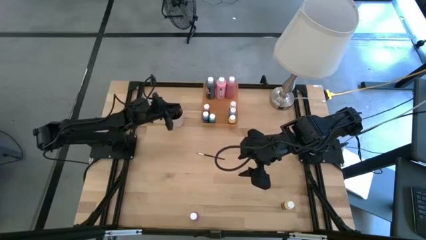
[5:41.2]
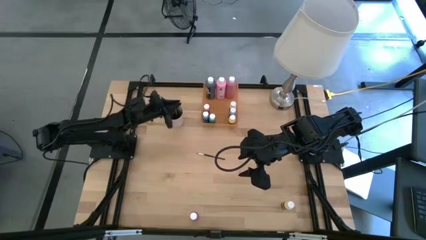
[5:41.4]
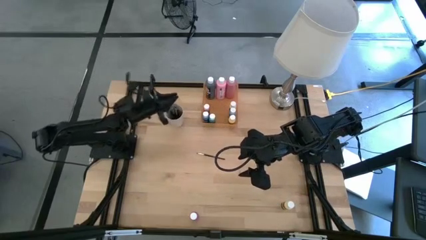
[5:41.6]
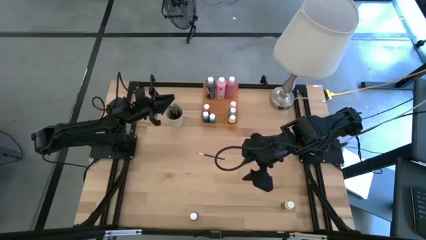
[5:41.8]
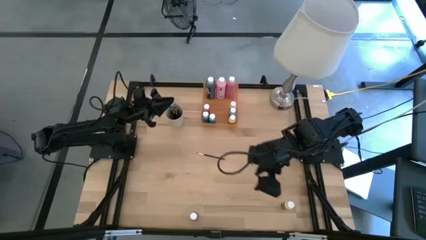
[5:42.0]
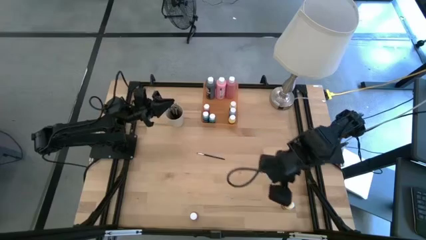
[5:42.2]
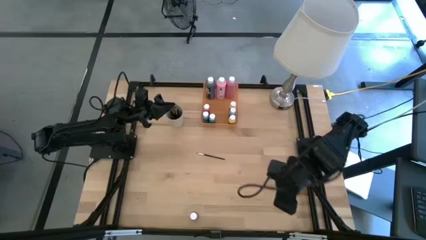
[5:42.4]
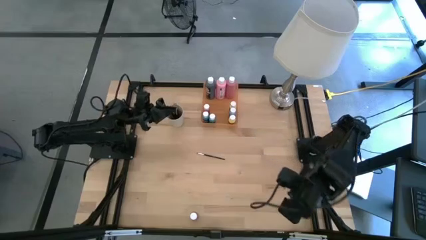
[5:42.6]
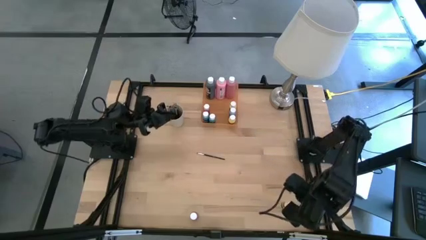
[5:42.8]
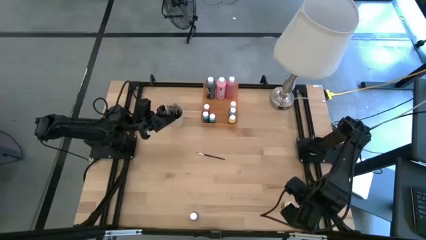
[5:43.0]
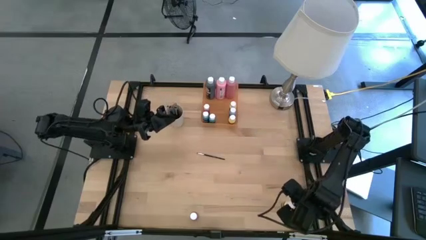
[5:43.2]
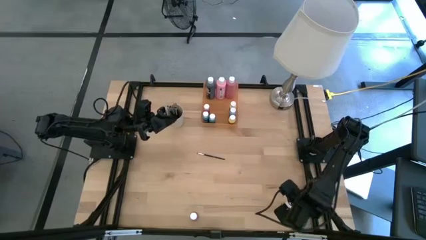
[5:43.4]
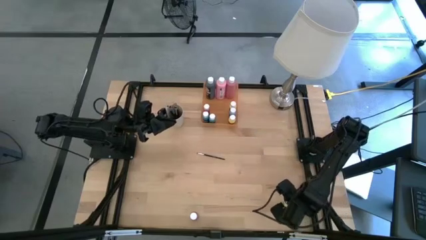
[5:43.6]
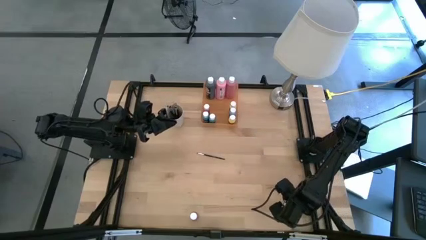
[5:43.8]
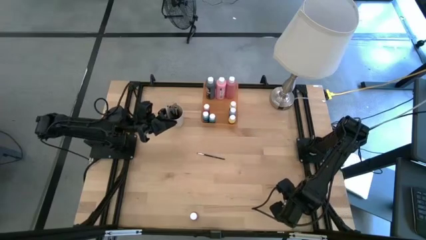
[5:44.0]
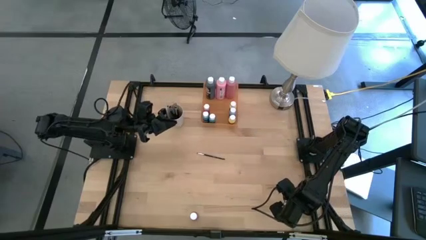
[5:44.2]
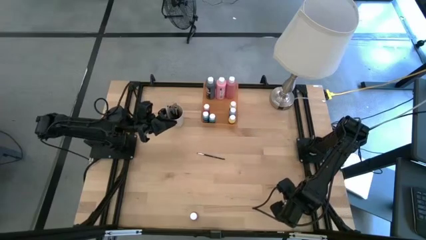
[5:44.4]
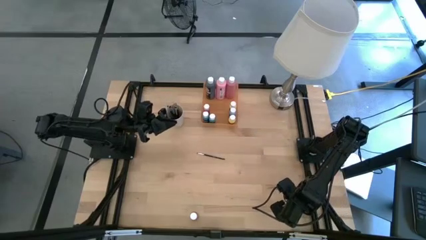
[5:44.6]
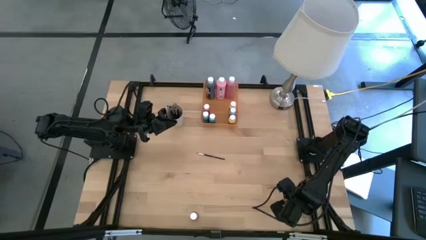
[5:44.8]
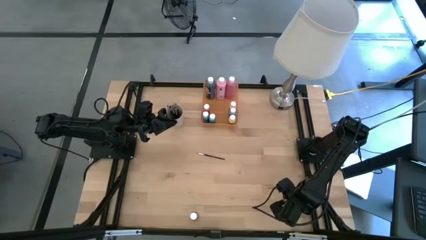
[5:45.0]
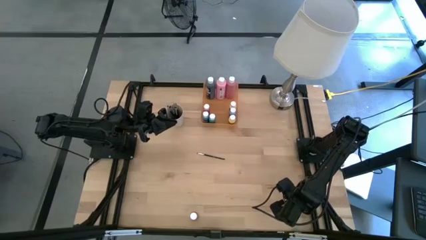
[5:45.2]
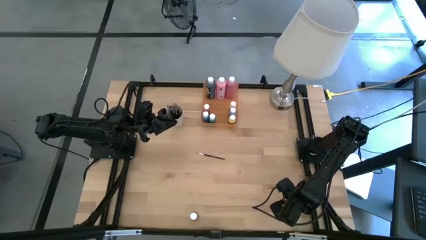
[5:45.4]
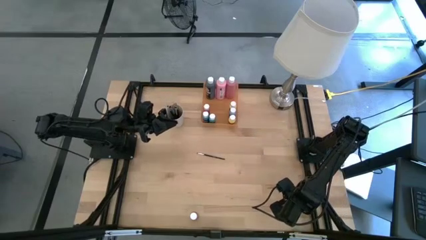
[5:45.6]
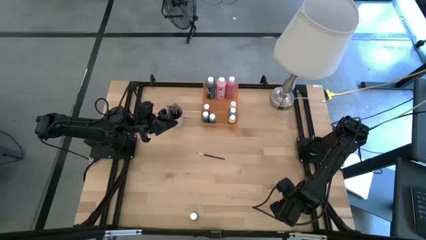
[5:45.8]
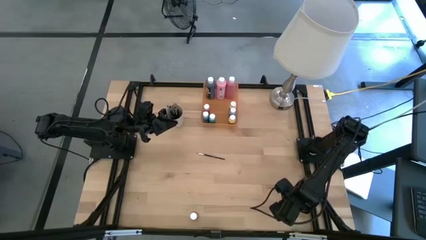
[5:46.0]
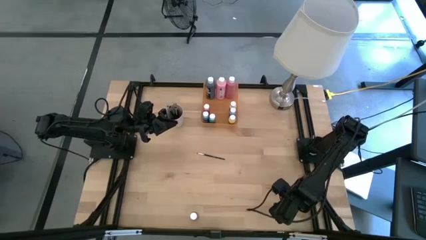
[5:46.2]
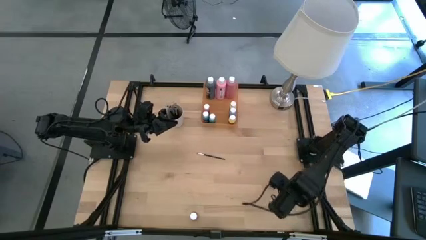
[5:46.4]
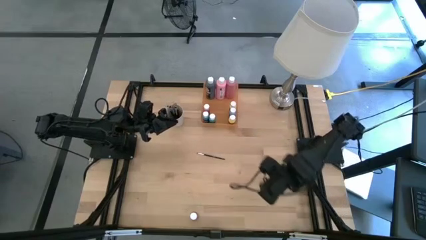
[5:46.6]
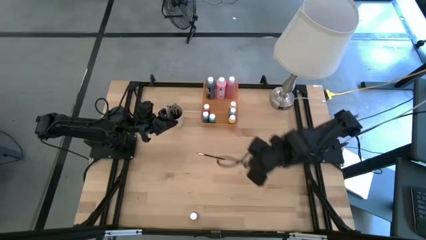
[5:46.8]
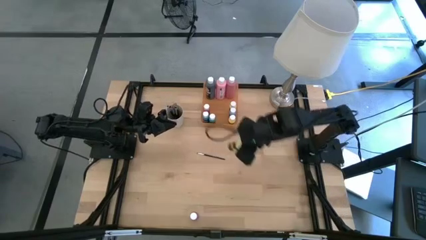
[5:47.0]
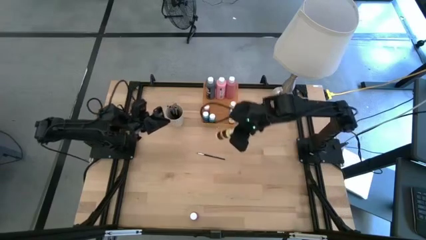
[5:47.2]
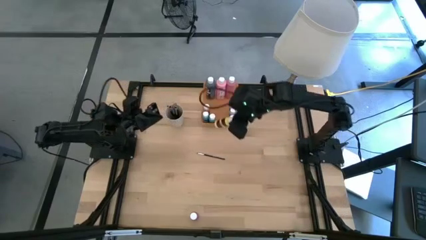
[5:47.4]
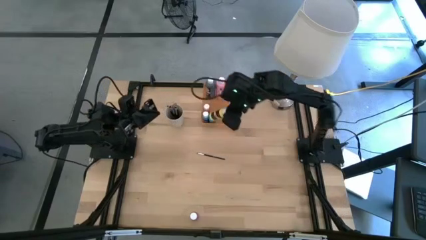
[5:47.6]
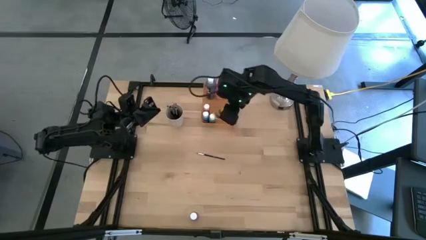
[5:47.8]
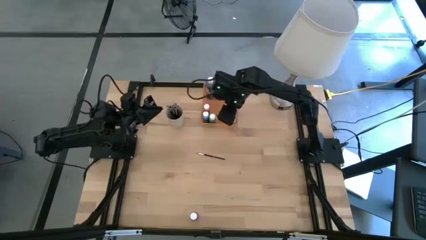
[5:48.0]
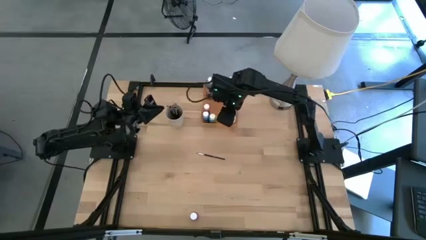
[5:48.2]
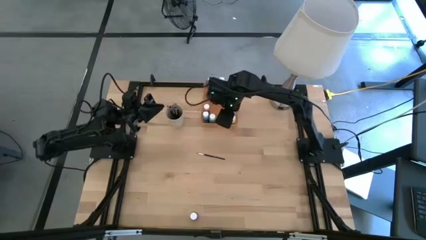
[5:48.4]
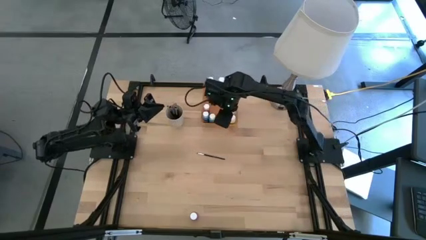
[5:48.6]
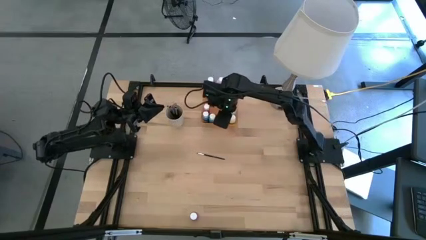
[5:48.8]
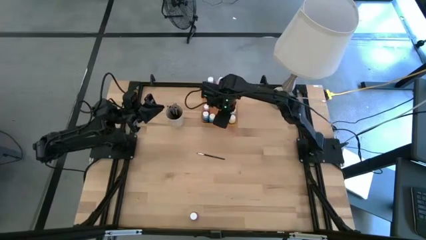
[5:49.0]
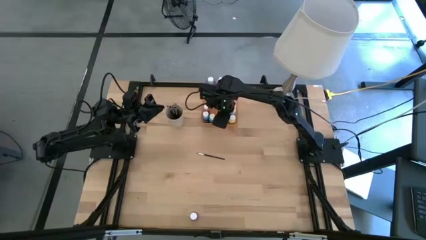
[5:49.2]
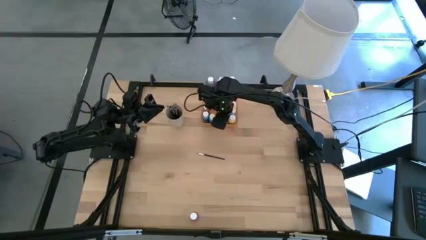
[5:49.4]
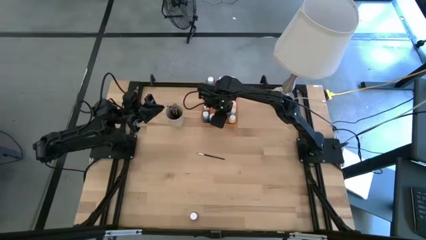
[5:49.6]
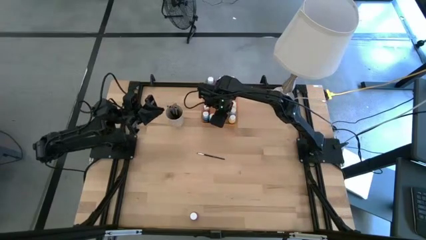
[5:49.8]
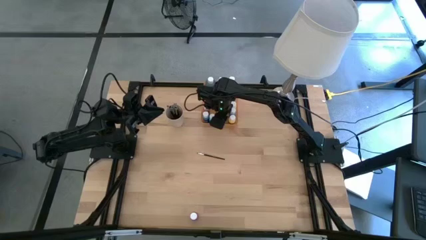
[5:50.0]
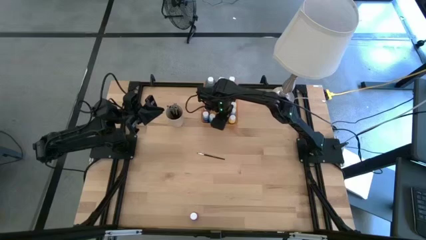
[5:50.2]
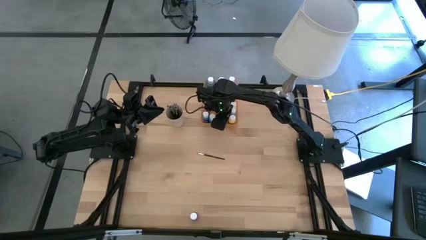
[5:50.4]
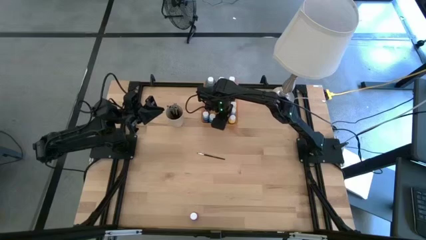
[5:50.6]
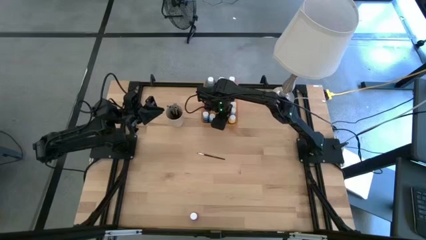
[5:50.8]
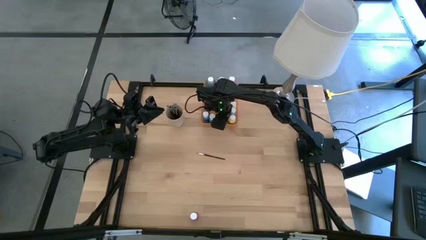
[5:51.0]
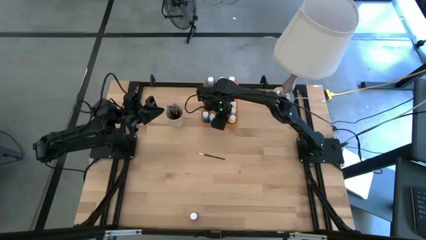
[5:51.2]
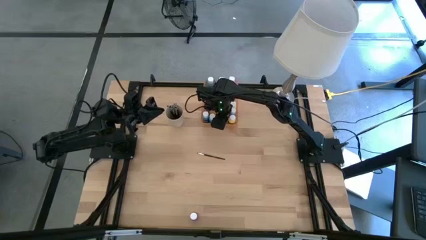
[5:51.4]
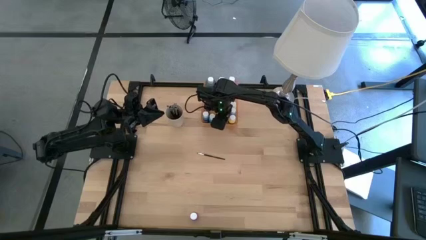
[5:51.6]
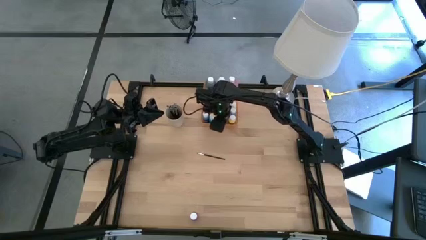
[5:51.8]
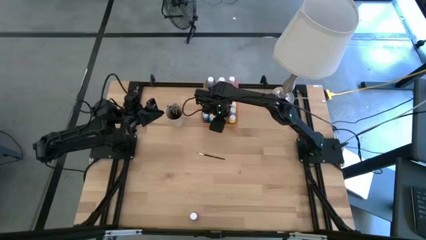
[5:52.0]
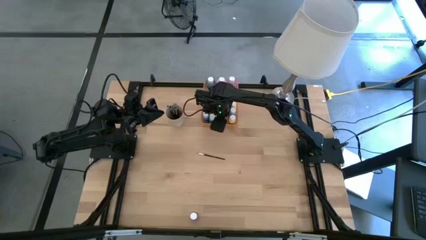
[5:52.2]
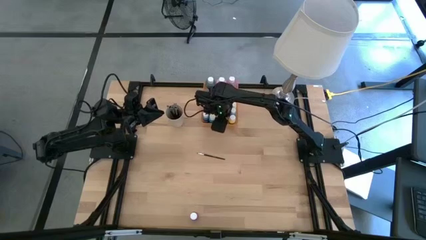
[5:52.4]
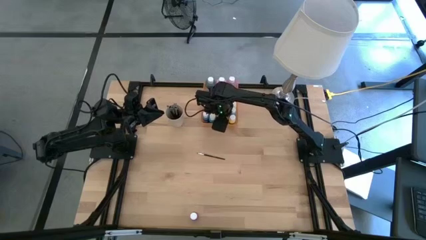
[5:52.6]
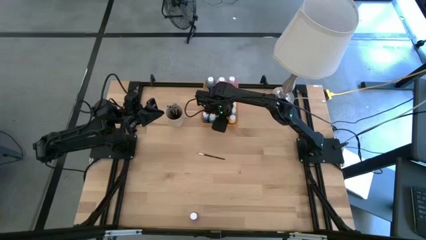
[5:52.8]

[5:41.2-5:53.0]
Task: Pick & Place Paint Supplies
Put the yellow paint bottle into the orange bin

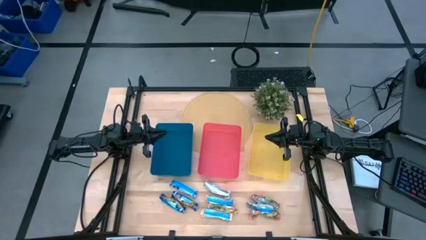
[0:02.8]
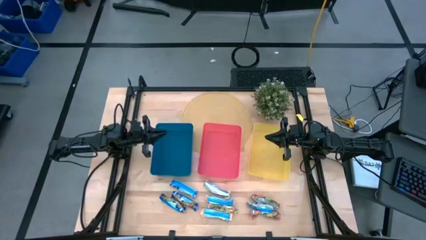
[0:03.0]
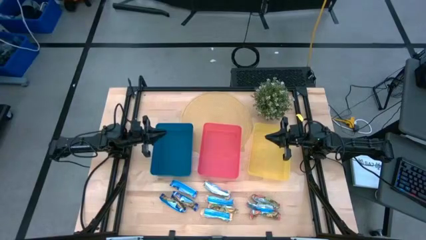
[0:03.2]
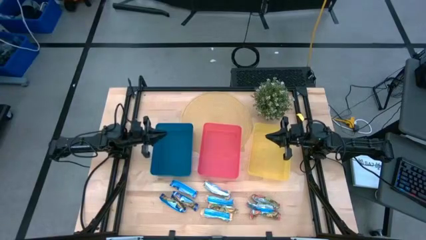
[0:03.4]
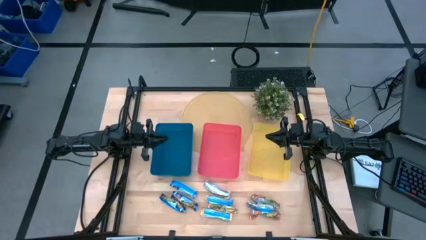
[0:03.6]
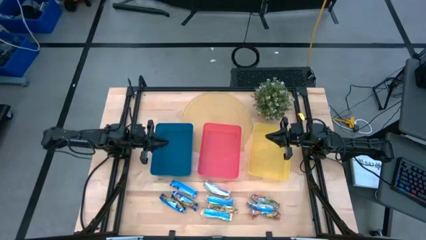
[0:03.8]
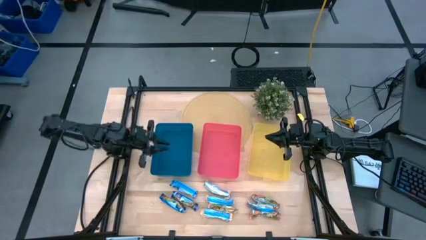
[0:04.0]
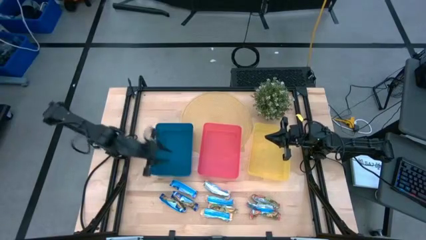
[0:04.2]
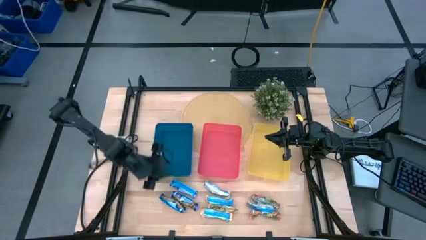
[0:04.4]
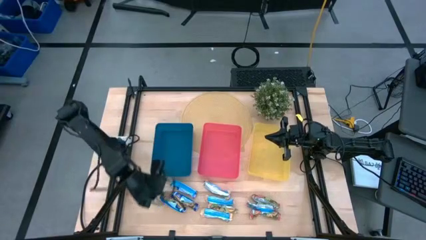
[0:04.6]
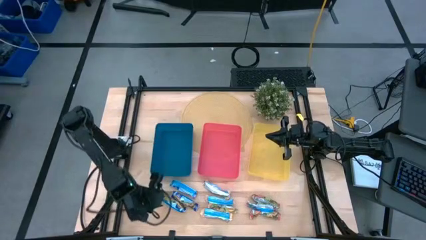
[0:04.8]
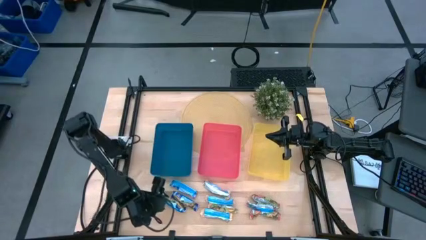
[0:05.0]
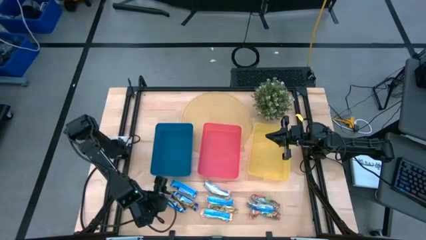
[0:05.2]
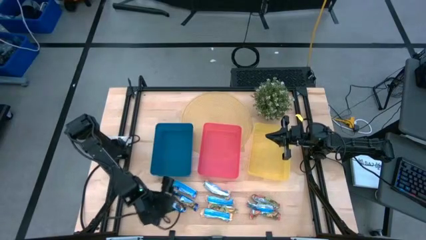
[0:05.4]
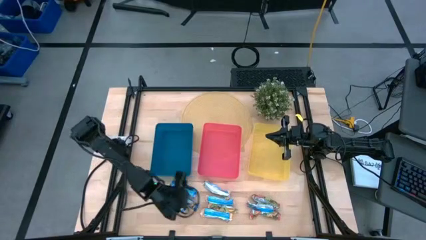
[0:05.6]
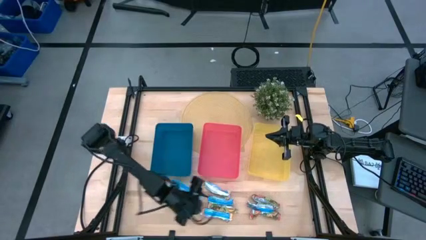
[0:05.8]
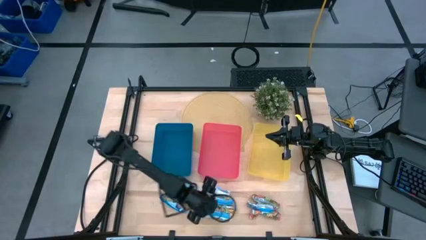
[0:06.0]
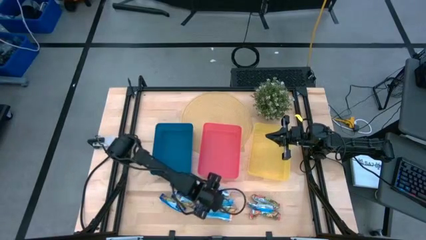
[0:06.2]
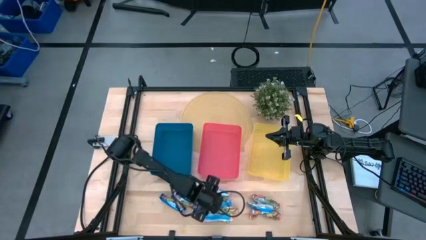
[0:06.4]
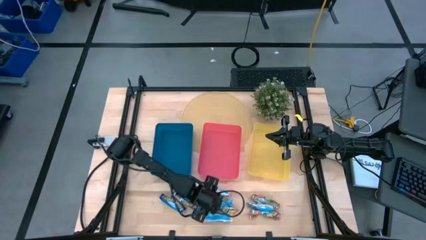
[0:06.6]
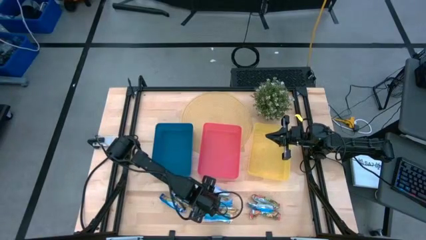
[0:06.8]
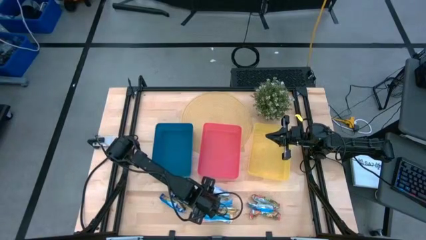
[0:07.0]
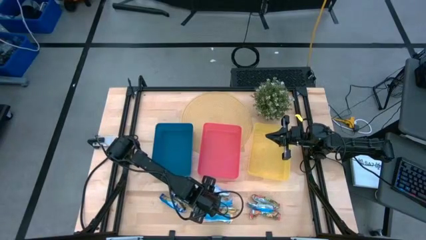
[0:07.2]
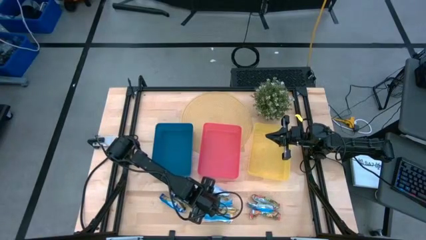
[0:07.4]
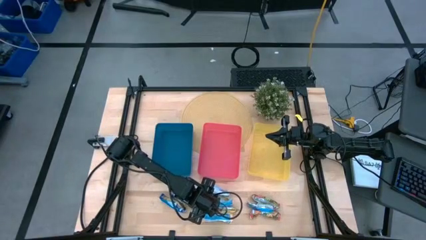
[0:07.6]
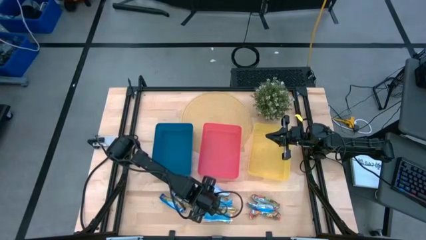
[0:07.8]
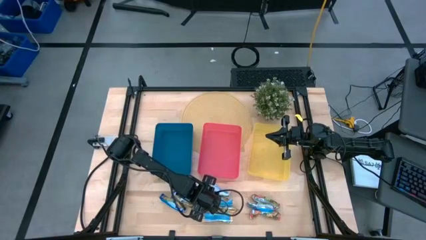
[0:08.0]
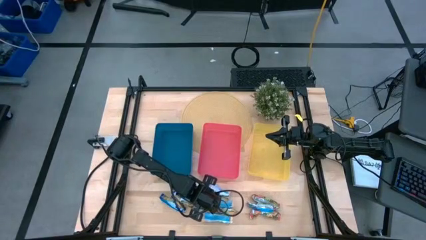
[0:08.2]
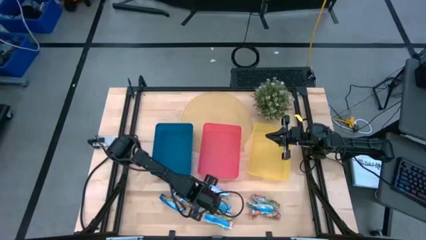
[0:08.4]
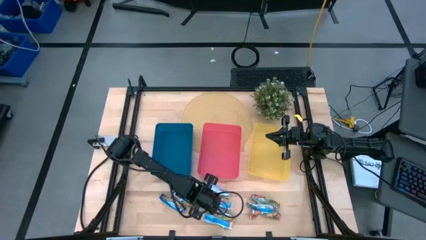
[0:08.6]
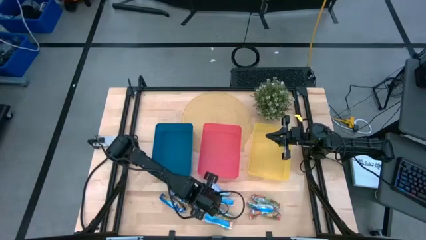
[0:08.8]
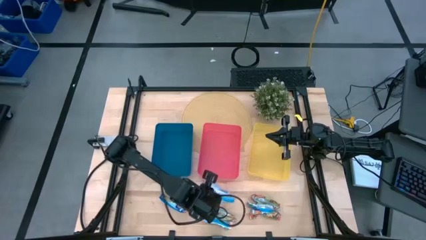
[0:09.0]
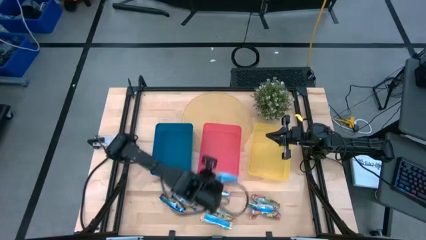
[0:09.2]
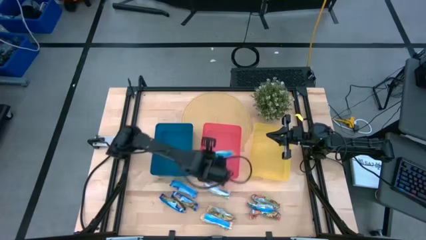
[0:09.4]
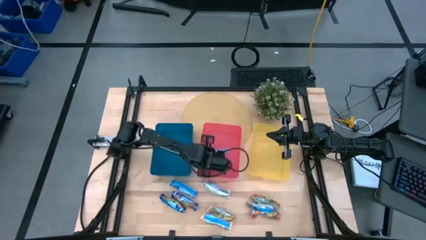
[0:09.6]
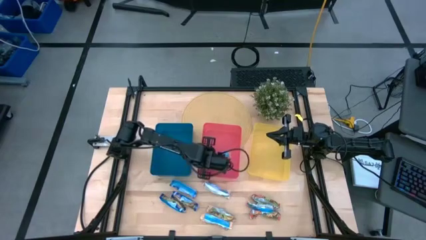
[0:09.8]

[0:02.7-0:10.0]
Task: Pick and place Granola Bars by type
Put the orange granola bar into the red bin
